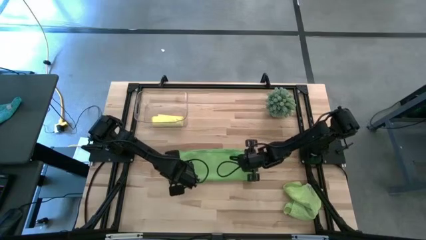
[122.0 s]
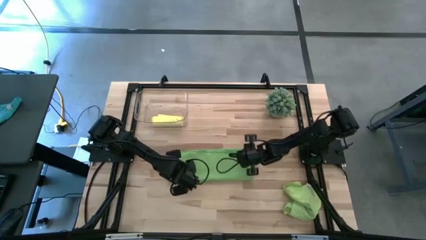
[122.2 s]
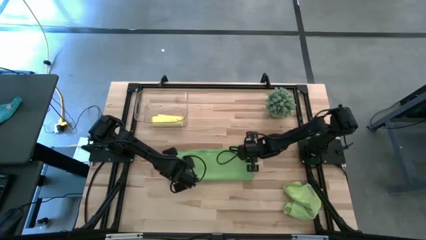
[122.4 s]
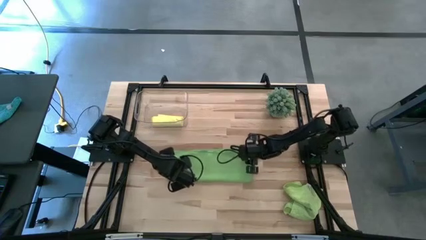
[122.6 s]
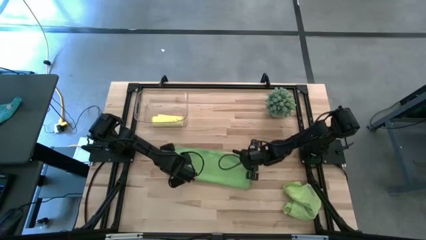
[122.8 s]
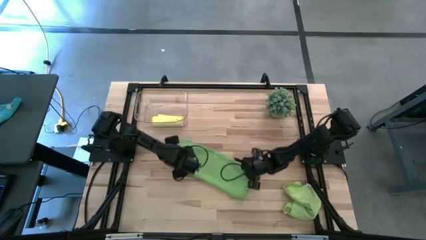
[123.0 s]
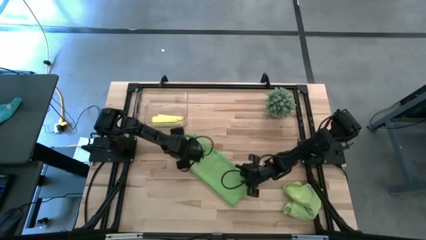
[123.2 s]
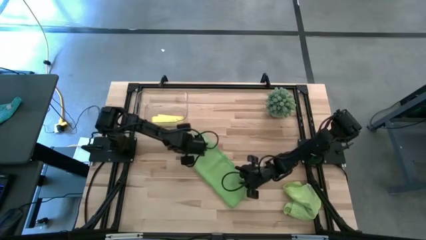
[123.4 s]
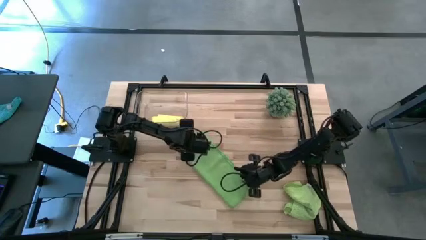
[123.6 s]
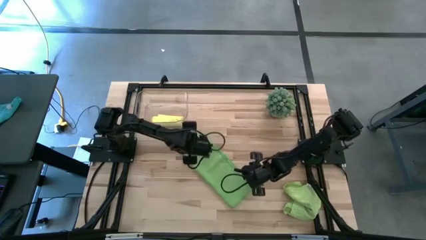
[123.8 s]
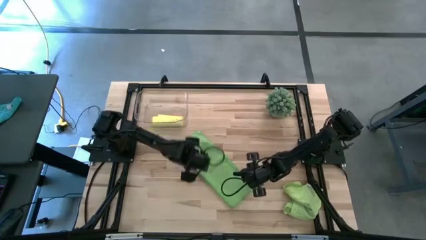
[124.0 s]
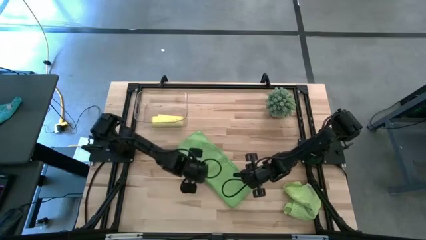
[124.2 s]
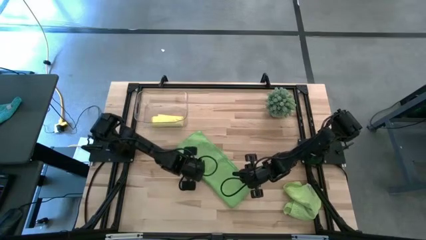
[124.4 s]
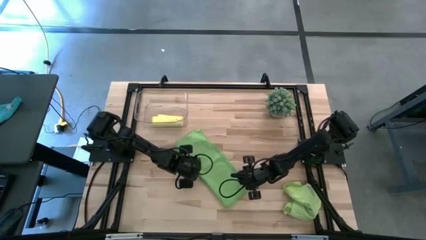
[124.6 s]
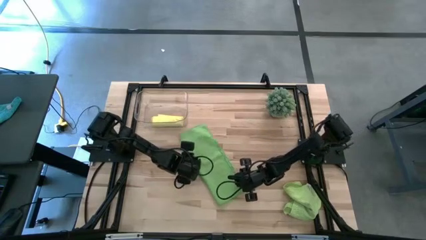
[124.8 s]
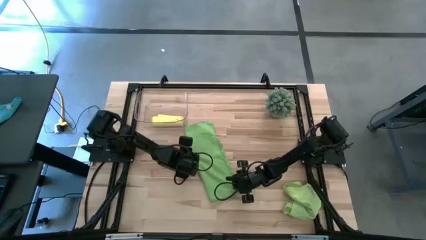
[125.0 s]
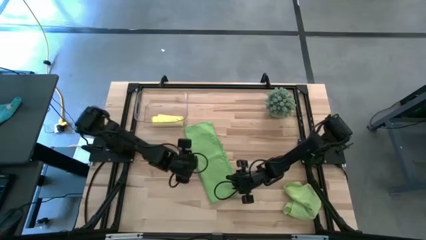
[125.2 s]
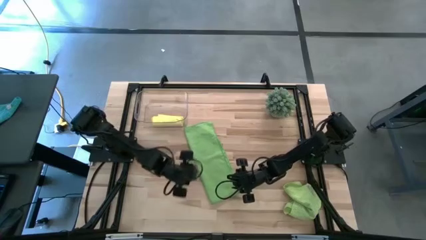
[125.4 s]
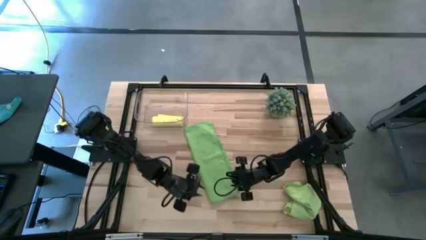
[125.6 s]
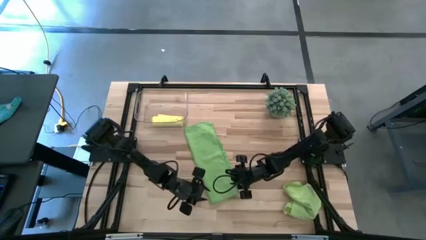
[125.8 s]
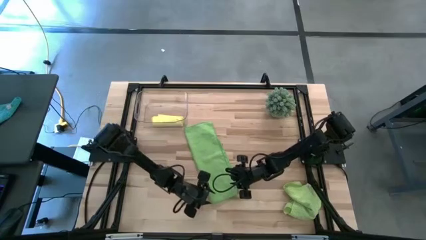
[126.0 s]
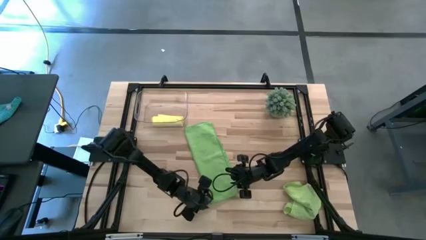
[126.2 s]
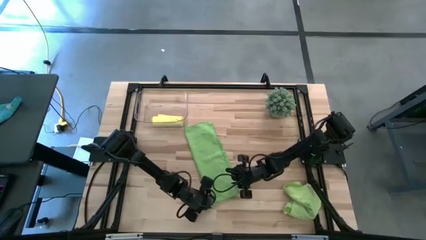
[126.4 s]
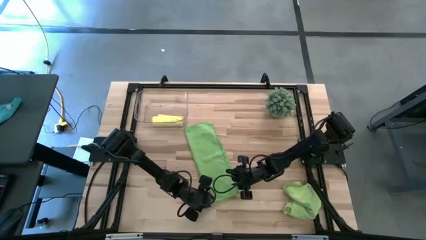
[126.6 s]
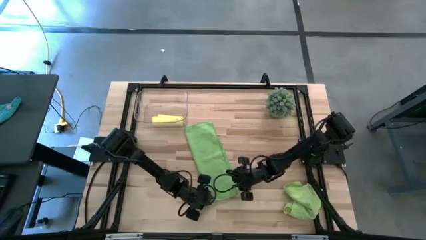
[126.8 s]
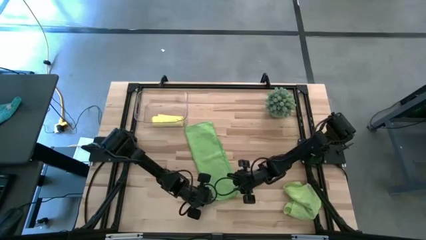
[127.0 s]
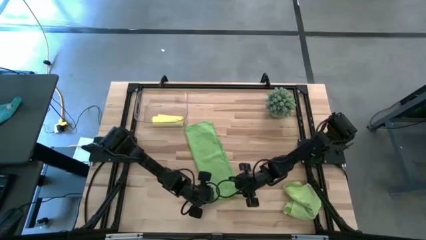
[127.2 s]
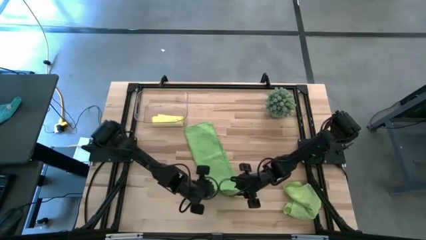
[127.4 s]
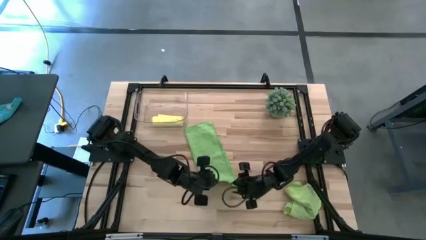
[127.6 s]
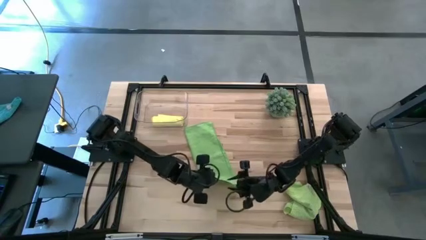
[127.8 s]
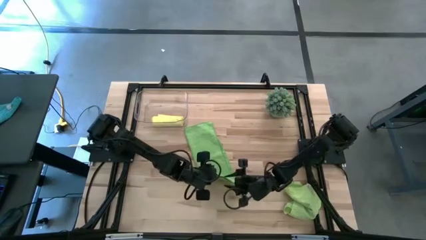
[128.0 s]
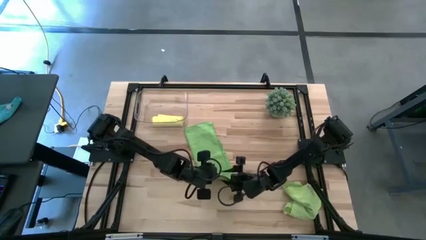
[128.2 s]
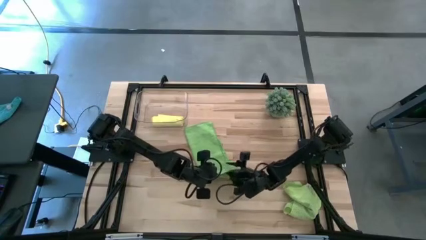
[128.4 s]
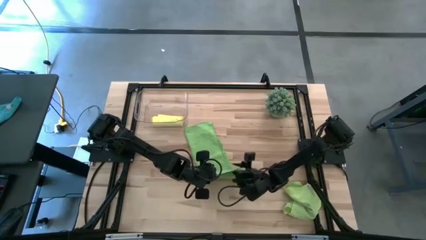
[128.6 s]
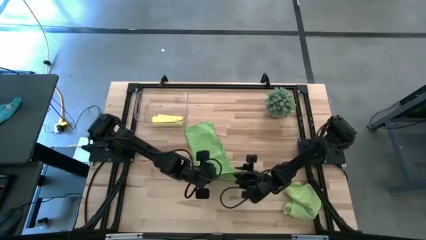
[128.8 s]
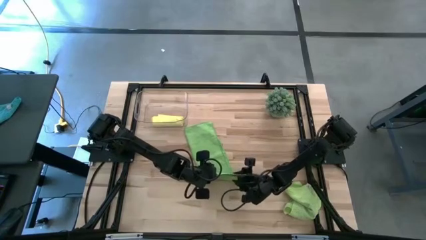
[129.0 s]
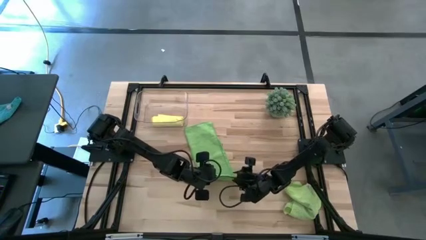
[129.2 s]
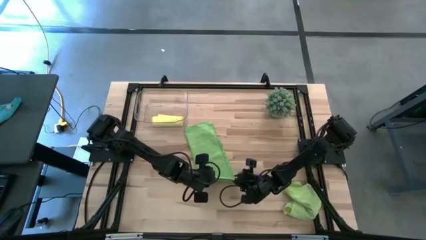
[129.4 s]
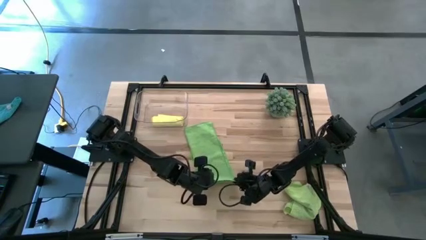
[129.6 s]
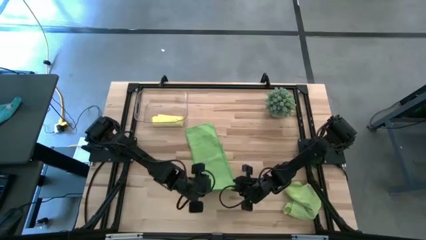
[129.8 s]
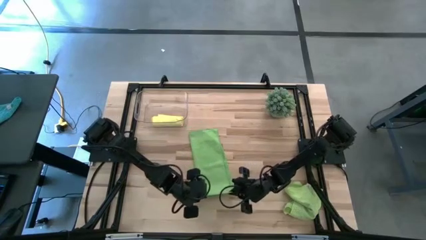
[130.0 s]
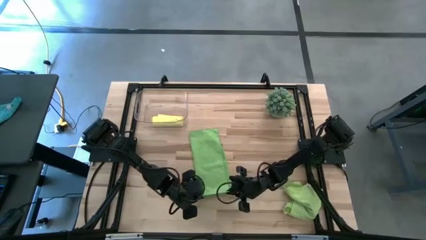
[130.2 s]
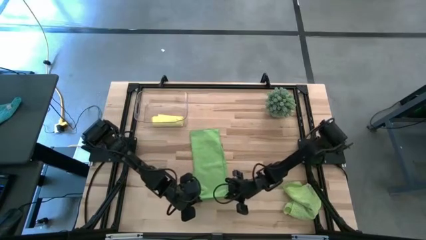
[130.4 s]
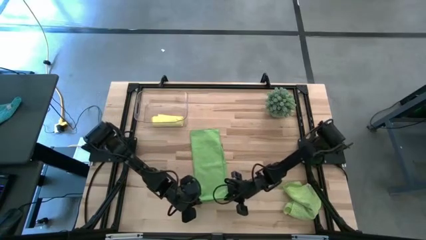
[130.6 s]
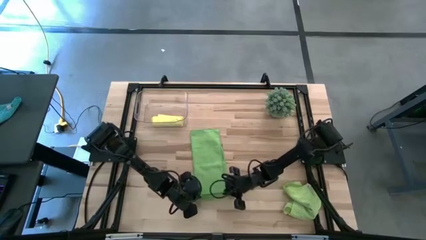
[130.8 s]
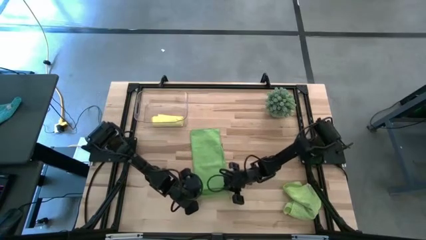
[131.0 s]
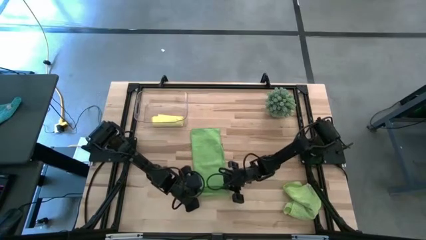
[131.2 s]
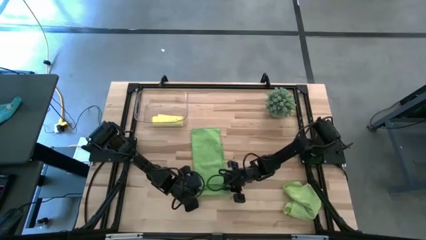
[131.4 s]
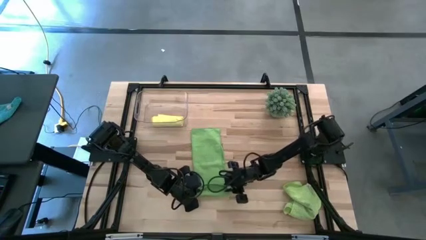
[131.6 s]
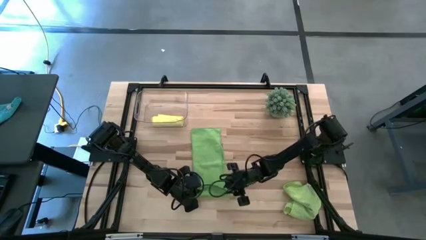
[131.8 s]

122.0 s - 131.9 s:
Task: Roll microfiber towels into tight, uniform cylinder then place into a basket
Roll the green microfiber cloth

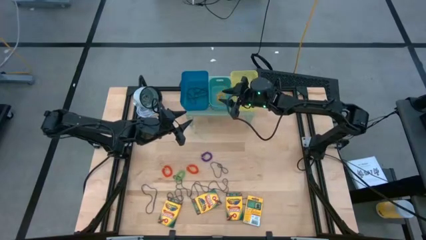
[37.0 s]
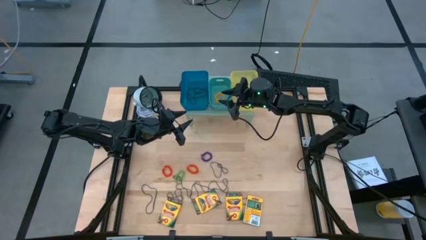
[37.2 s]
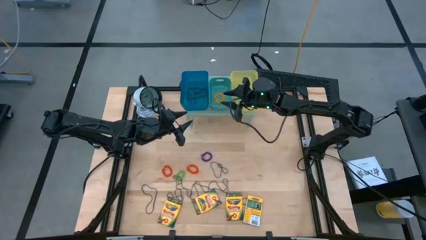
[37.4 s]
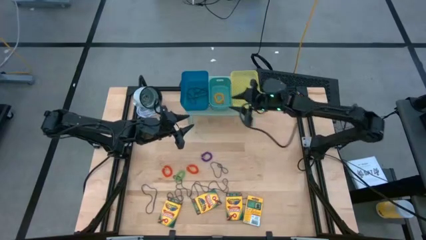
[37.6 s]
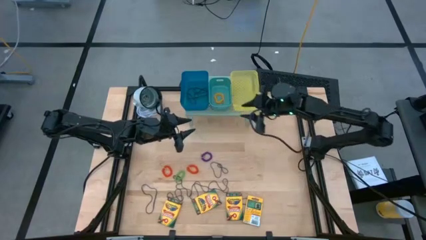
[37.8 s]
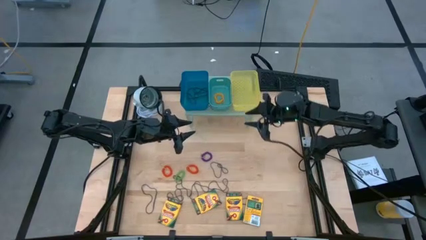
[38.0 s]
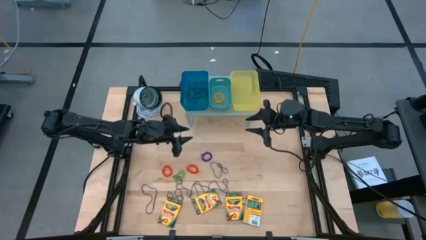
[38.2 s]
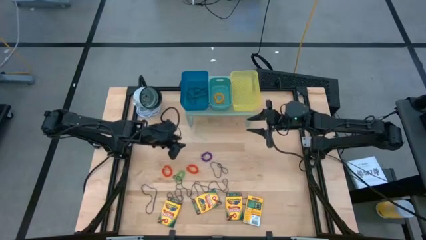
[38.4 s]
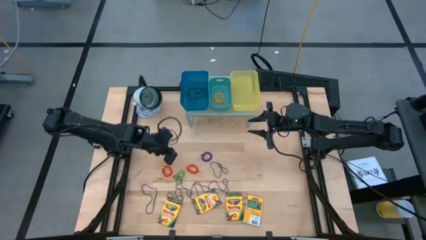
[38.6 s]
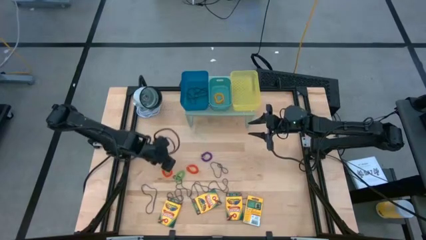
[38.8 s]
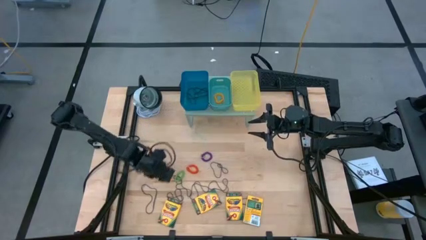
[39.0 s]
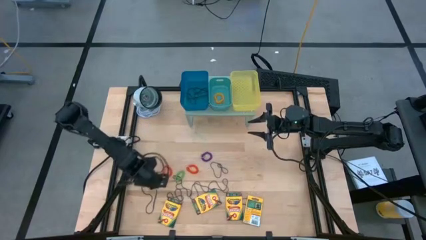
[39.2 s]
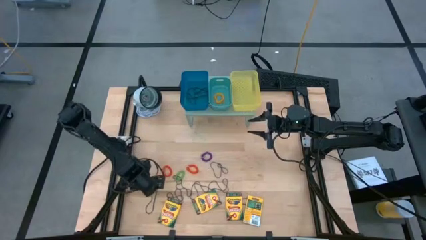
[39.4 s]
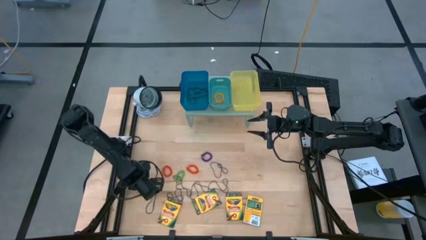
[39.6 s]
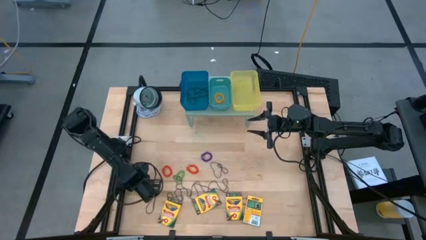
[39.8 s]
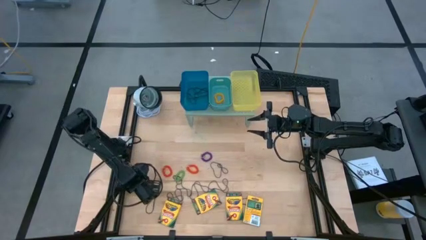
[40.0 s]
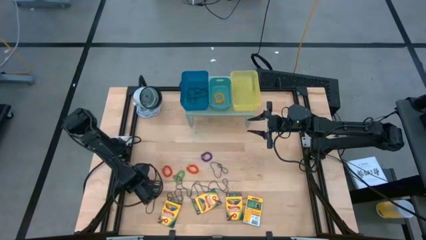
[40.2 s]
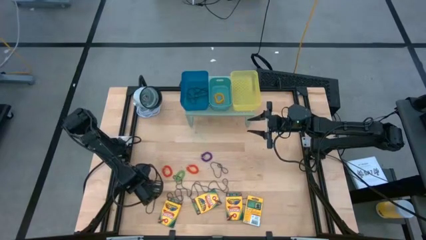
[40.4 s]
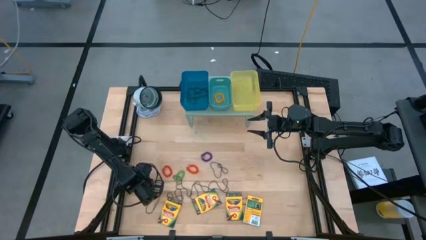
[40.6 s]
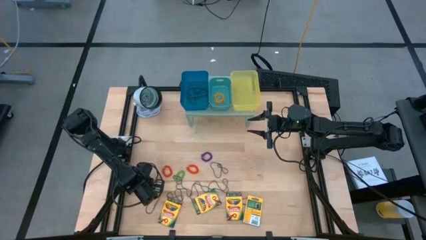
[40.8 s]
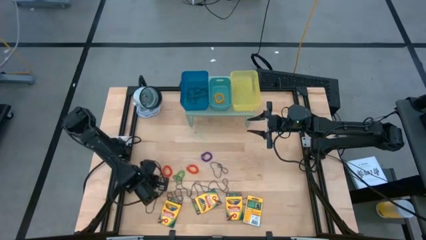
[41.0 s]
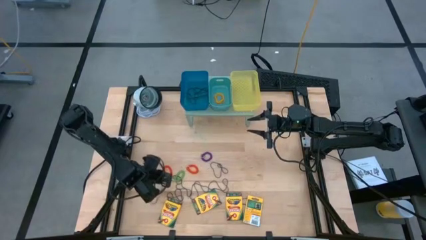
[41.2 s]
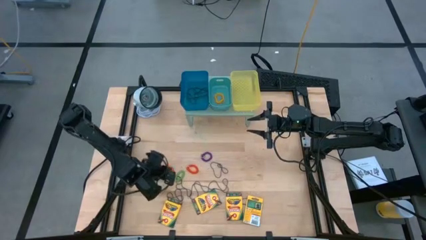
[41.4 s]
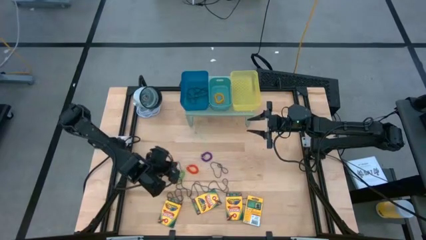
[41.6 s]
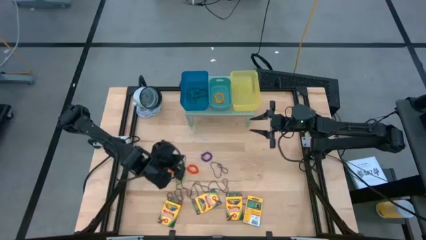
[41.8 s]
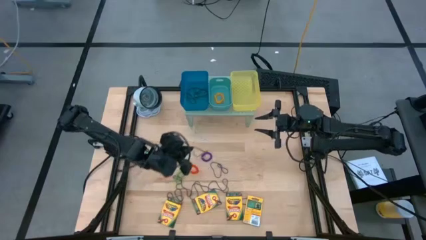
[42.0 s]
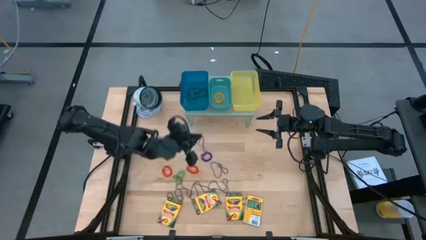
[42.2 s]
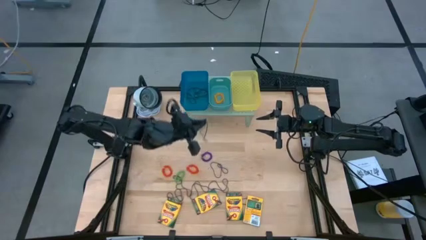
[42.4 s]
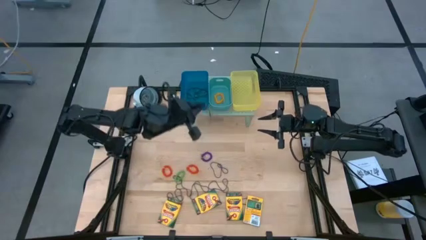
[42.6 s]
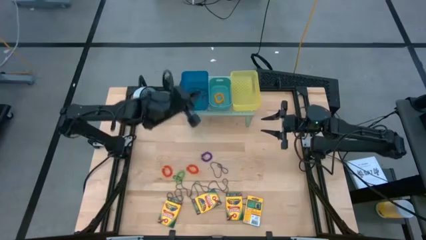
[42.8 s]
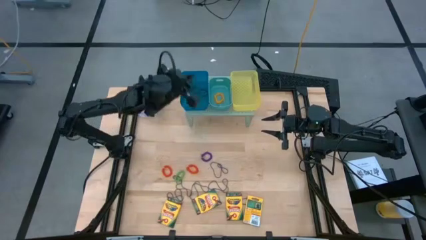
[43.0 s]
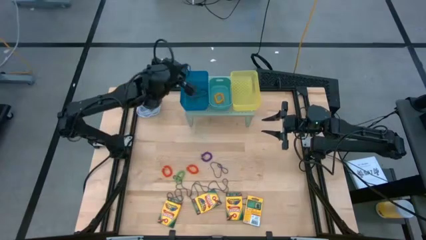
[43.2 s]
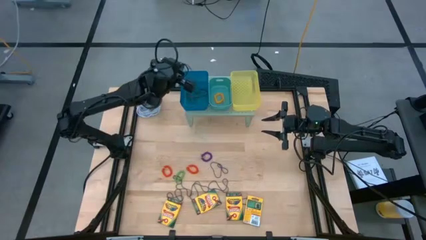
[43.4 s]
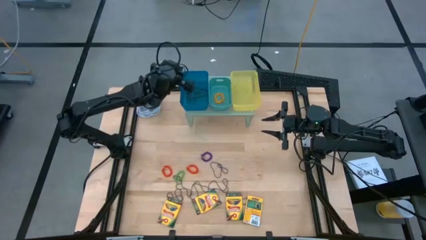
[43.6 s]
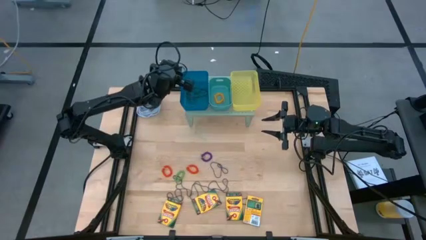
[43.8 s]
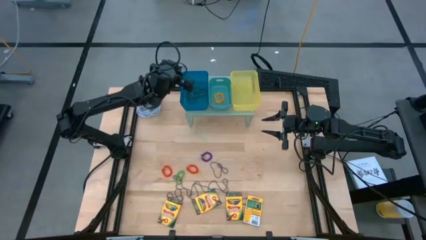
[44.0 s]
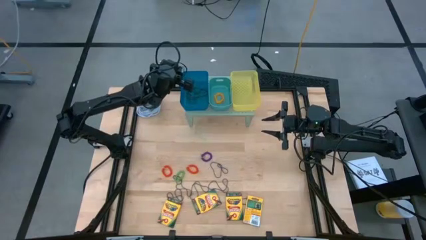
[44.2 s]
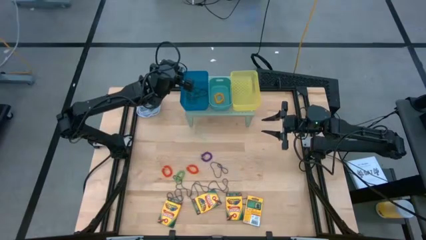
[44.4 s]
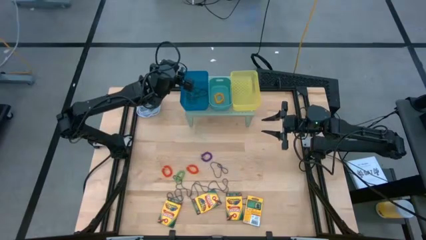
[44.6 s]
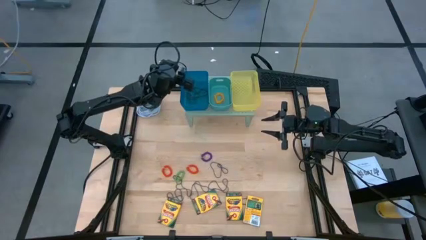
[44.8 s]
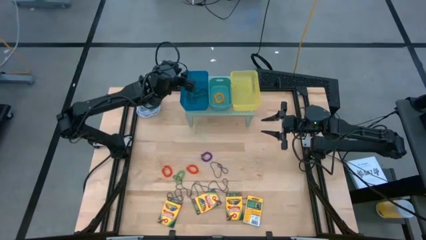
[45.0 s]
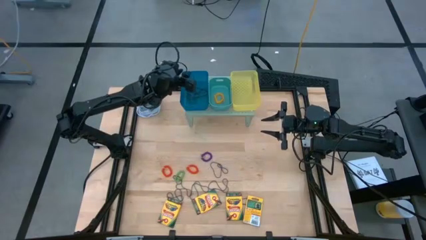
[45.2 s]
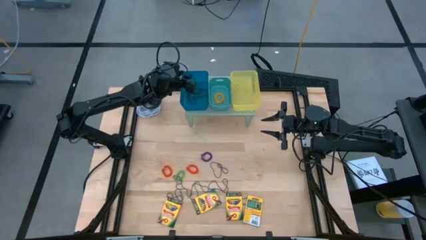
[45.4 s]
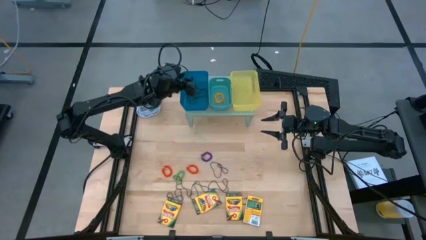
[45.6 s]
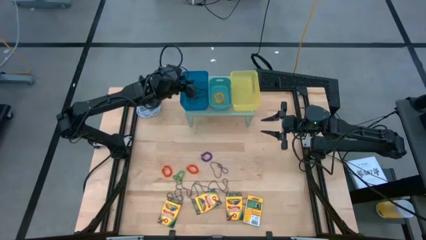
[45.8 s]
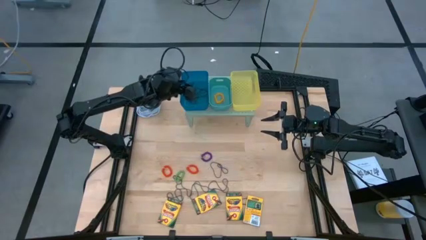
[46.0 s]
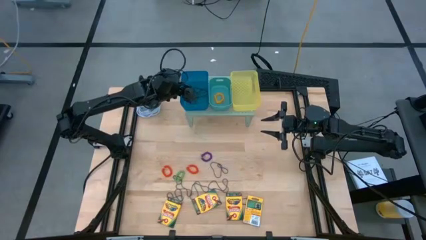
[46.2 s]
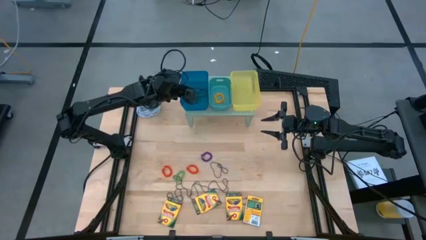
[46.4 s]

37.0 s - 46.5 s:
Task: Pick & Place Office Desk Supplies
Put the purple rubber band into the blue bin on the shelf
